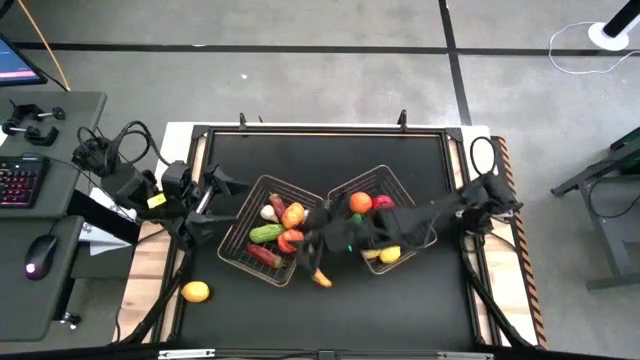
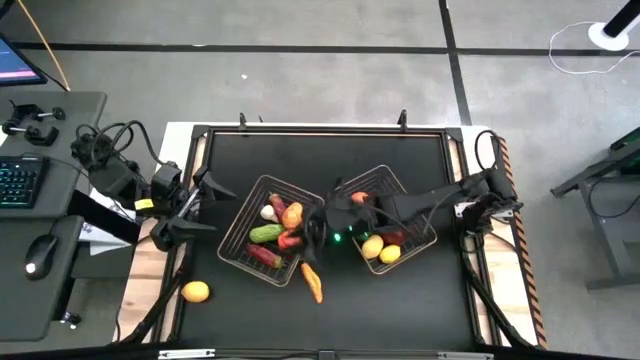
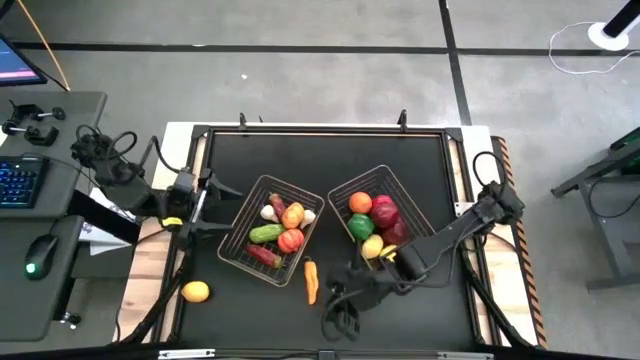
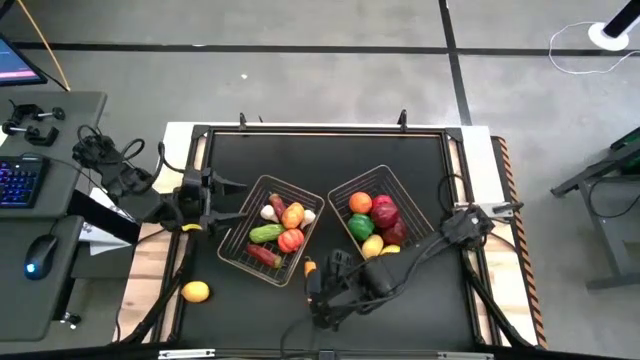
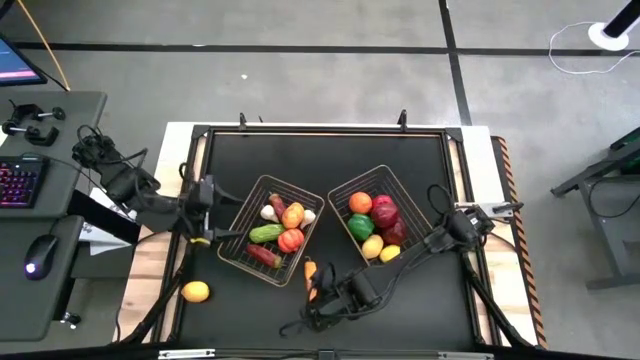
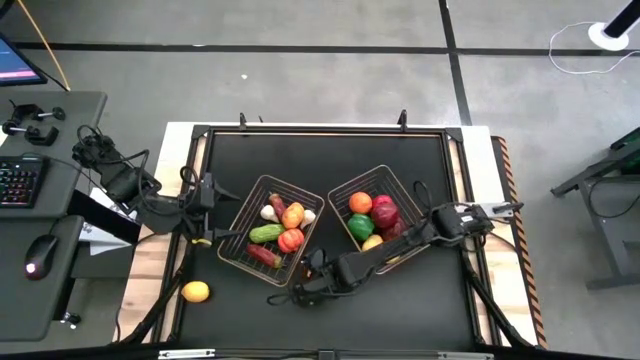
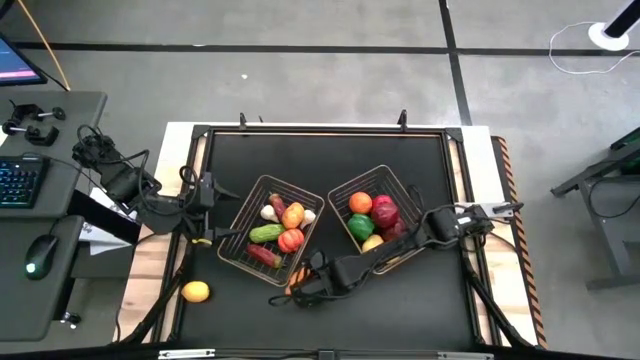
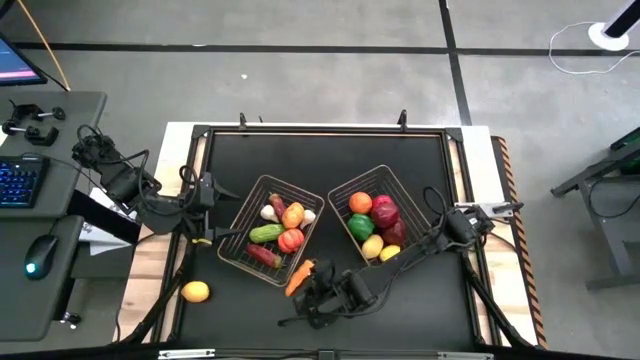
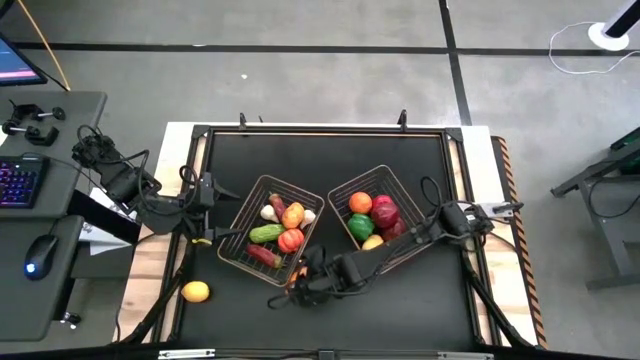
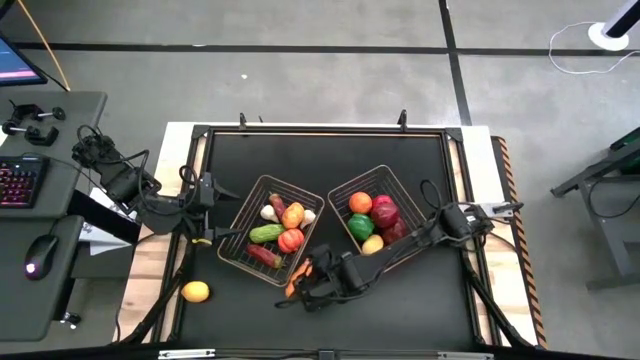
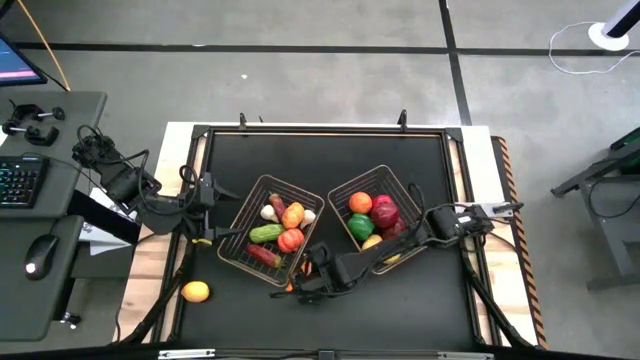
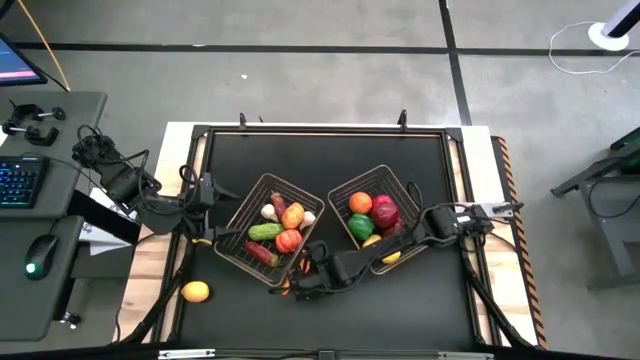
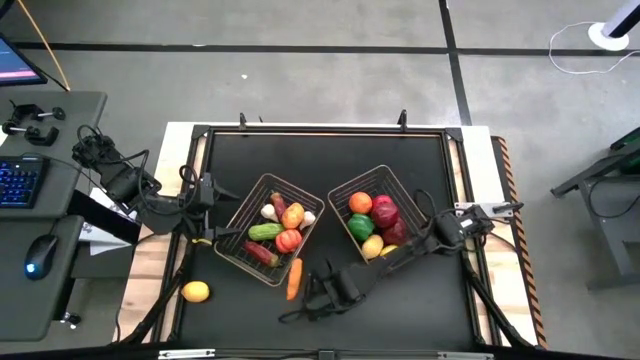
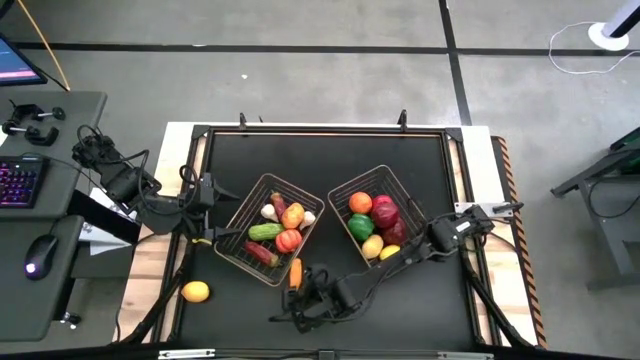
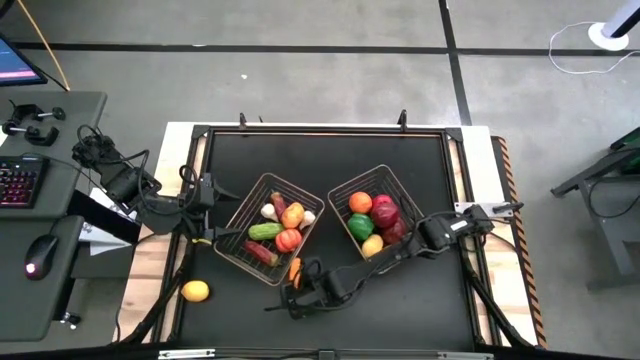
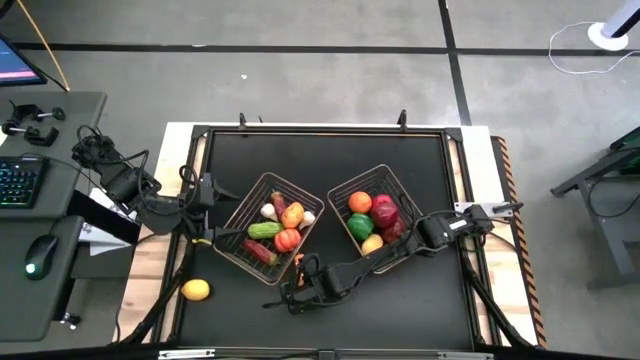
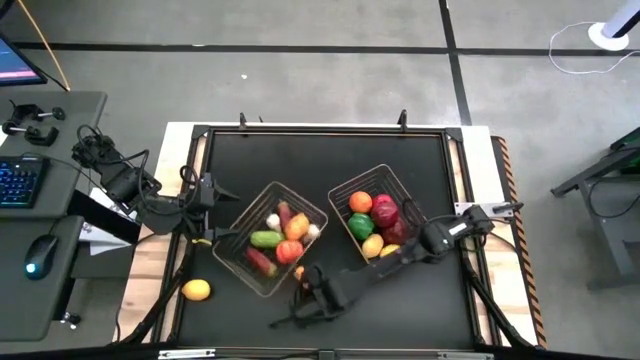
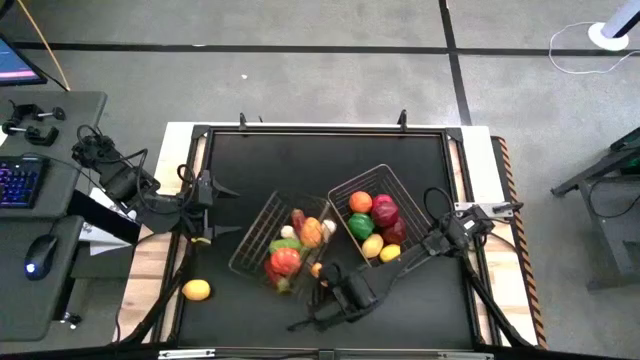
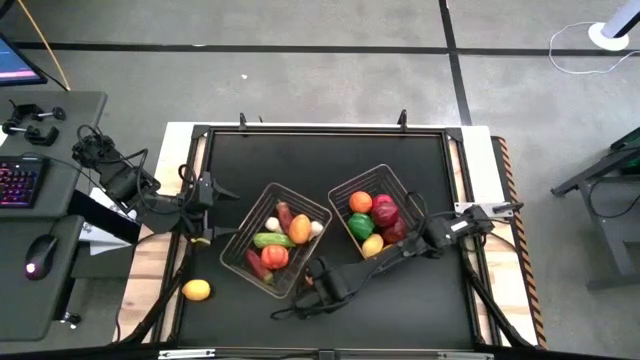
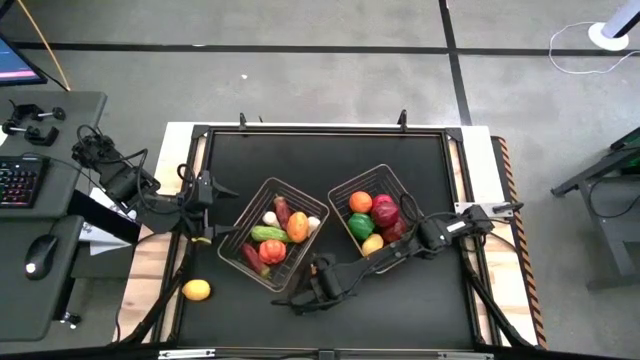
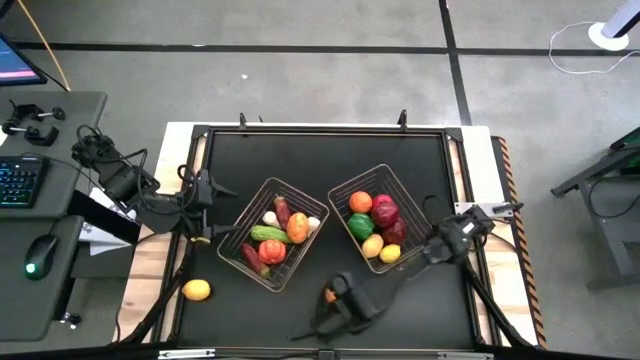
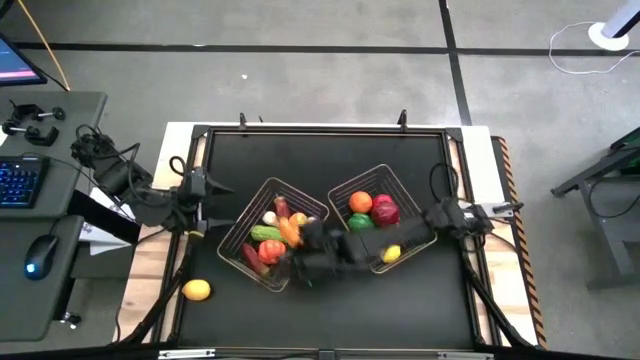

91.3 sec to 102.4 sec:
Task: Sort produce into baskets
Put the orange chili pepper into the left basket

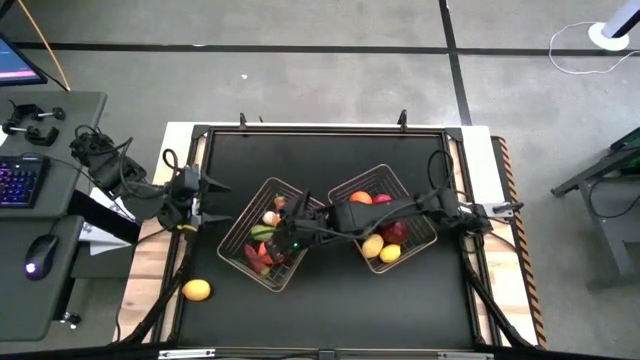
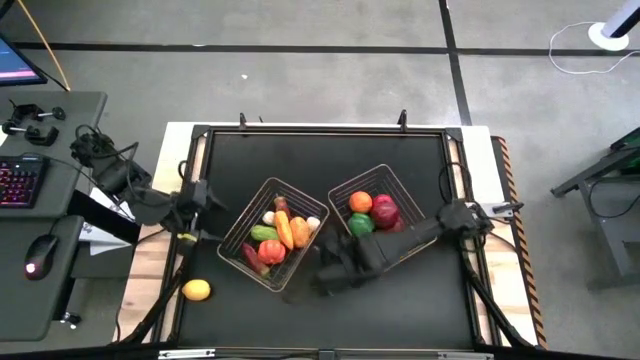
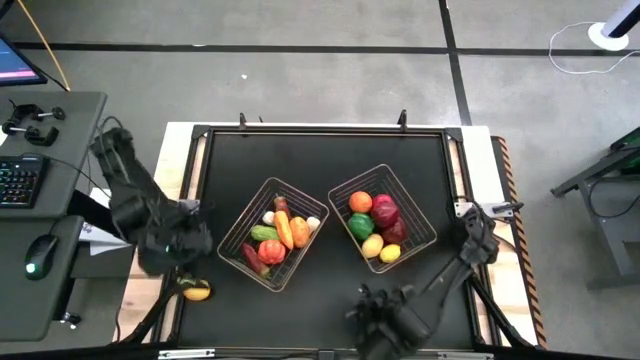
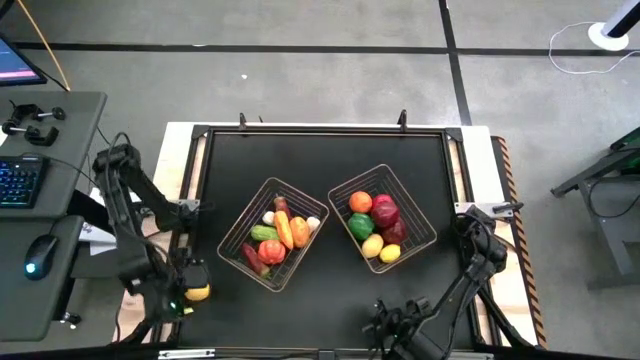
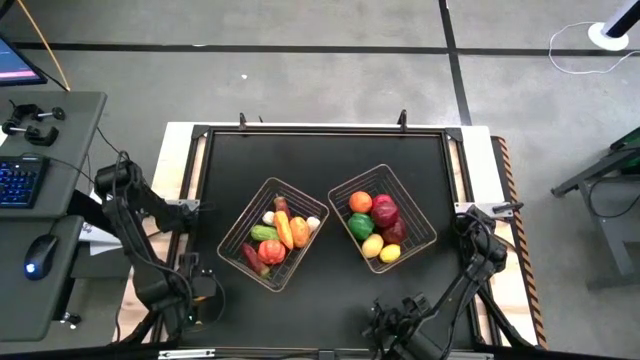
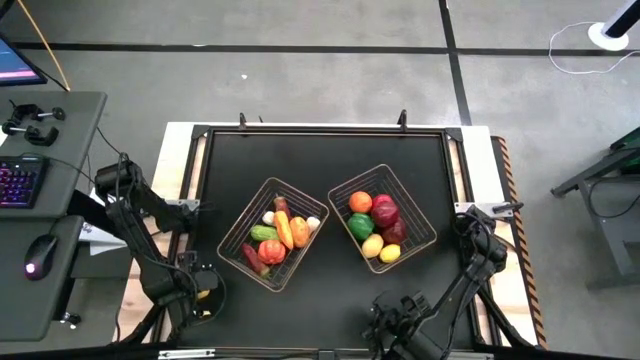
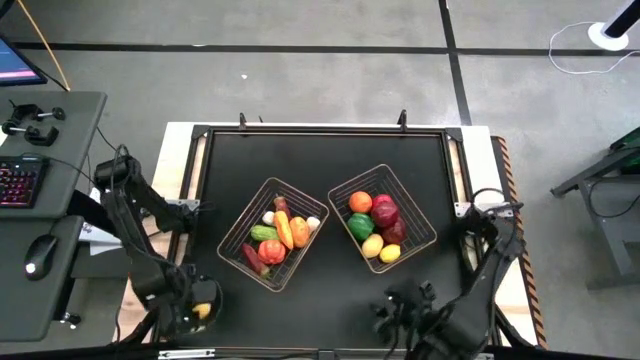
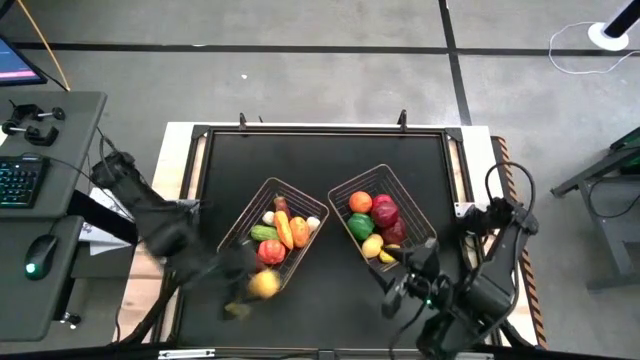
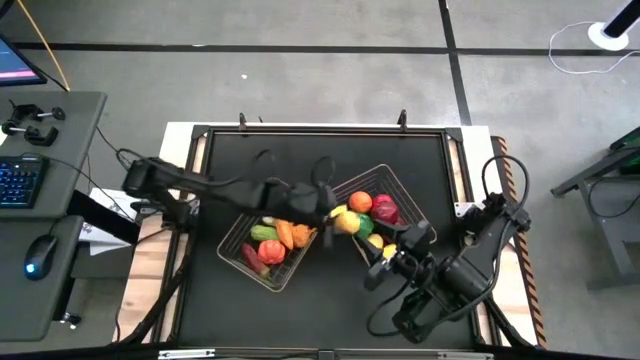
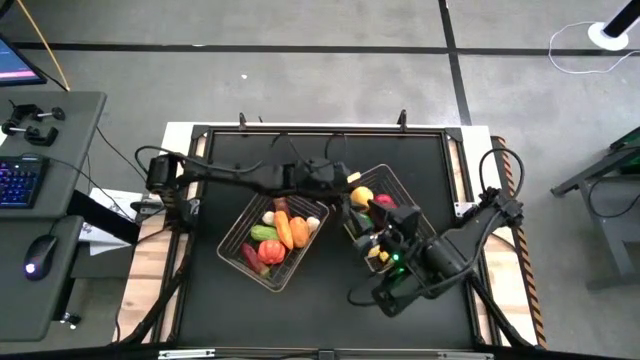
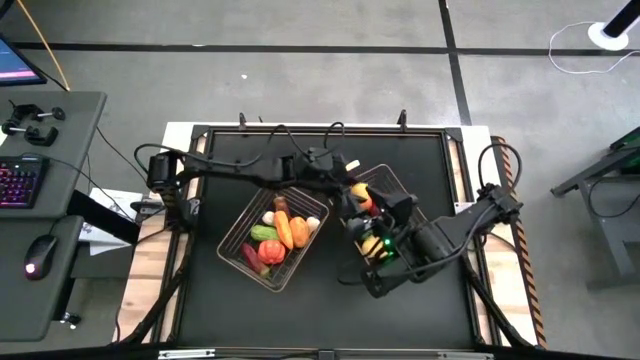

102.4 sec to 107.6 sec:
Put the lemon into the right basket

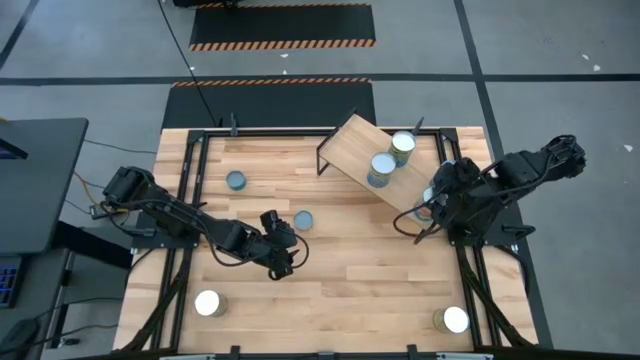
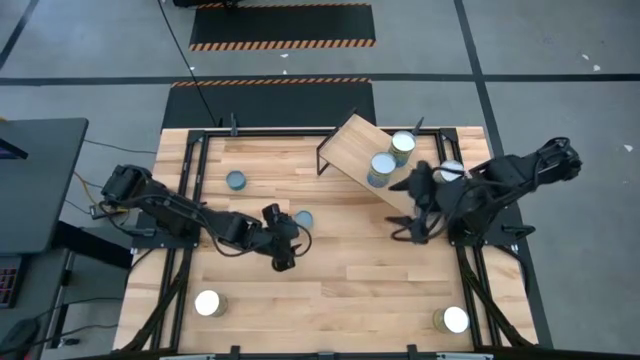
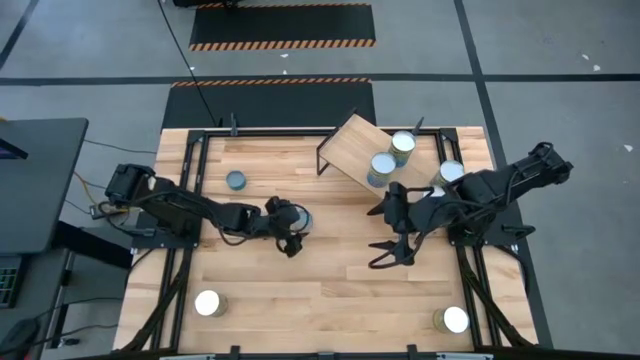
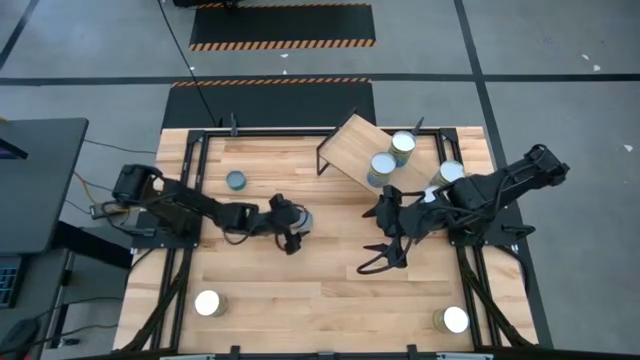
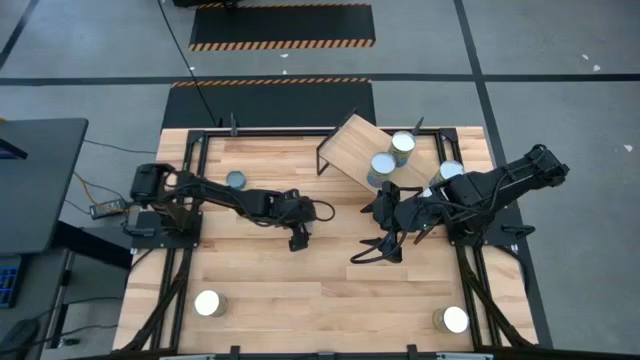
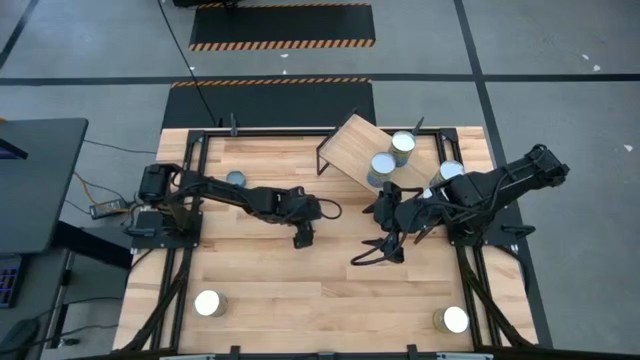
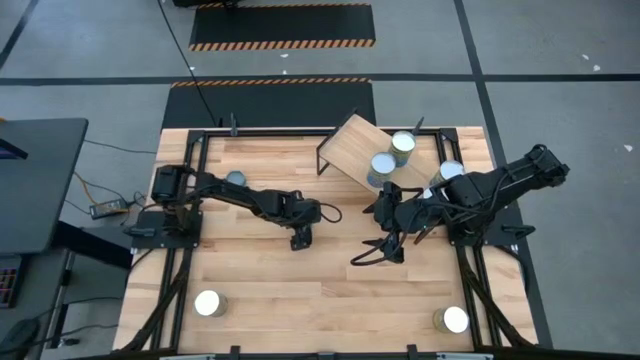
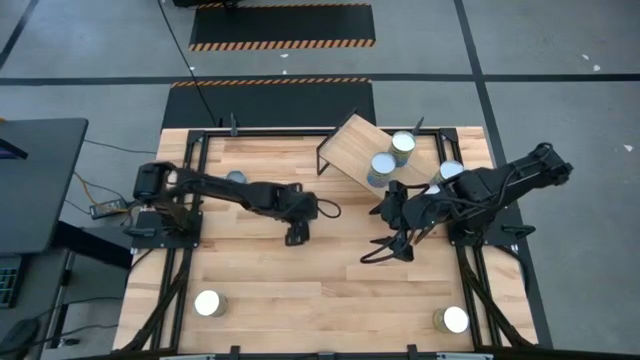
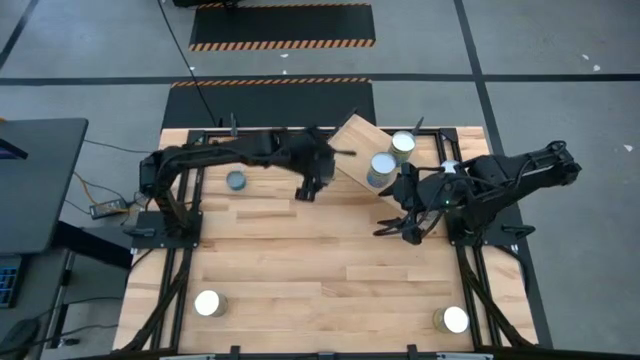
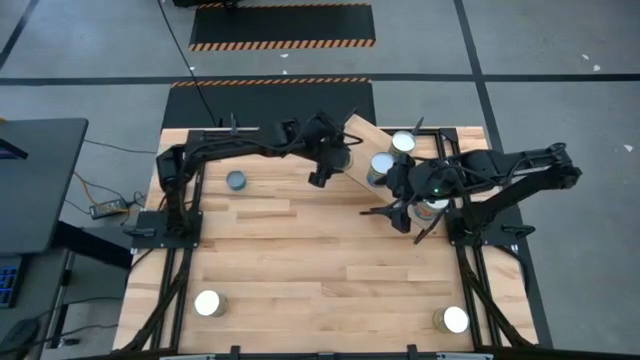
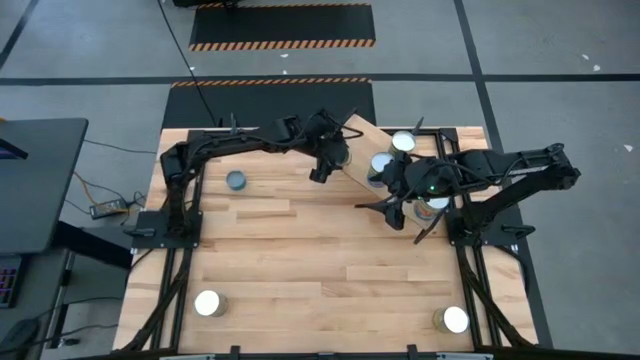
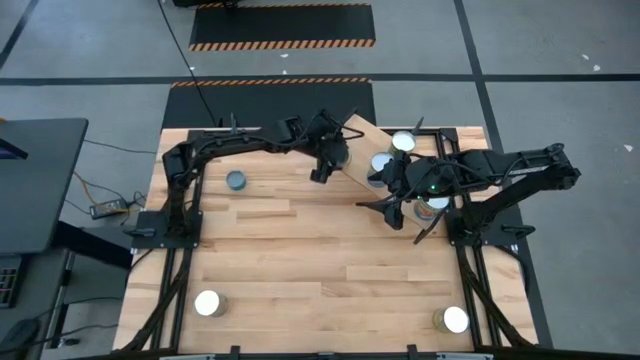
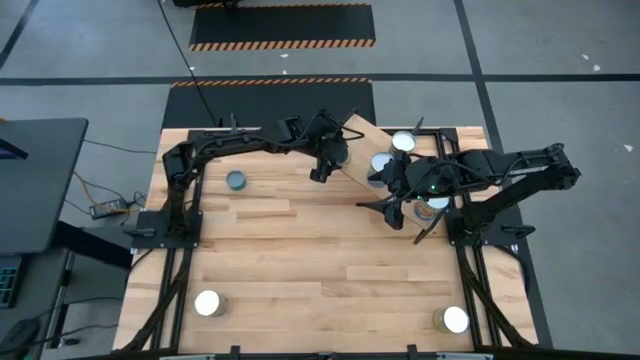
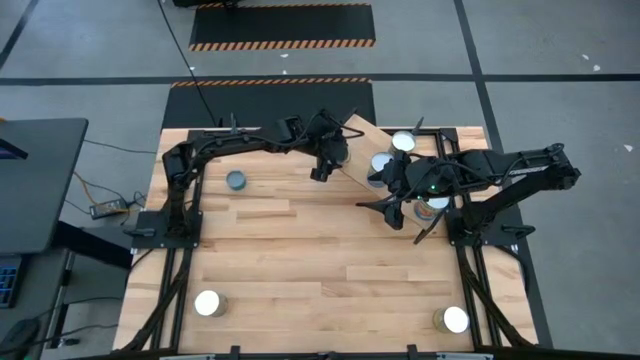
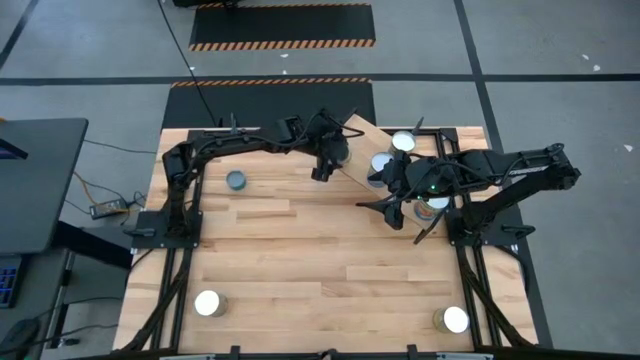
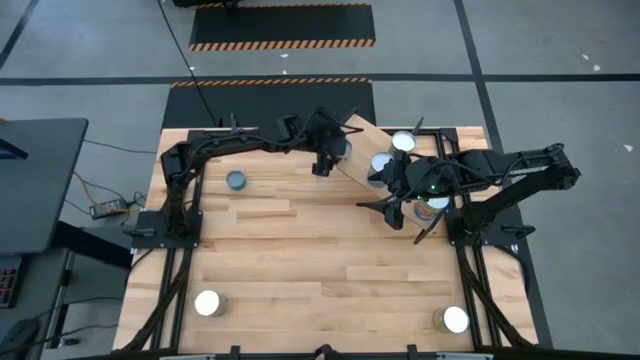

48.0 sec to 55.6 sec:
Task: Pick and place cans onto a shelf
Put the canned mushroom on the shelf
